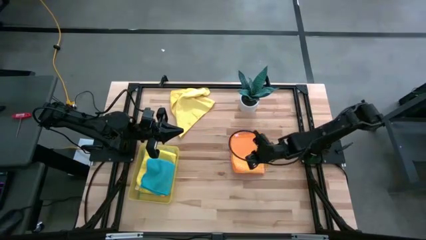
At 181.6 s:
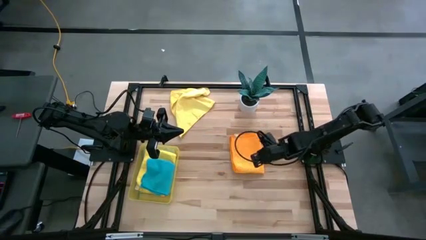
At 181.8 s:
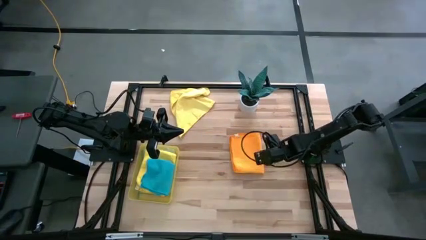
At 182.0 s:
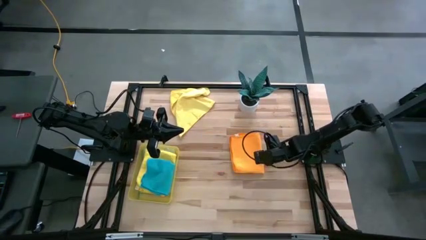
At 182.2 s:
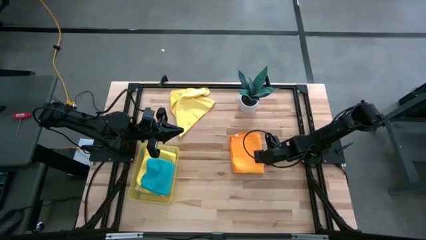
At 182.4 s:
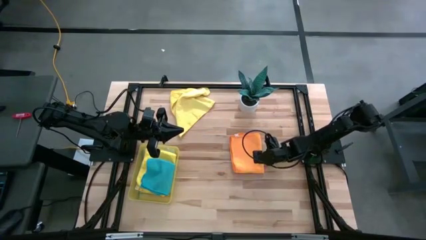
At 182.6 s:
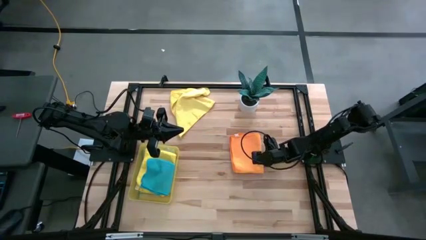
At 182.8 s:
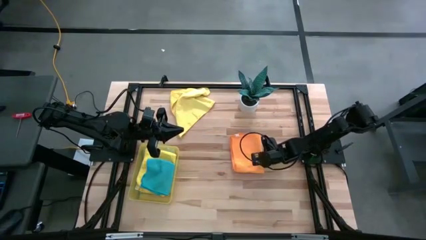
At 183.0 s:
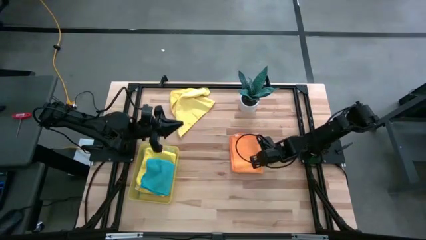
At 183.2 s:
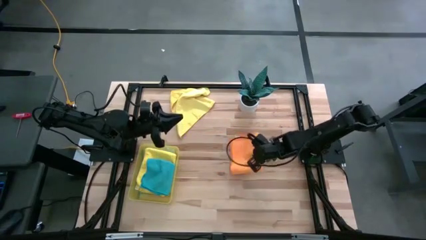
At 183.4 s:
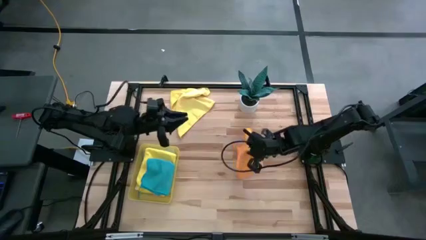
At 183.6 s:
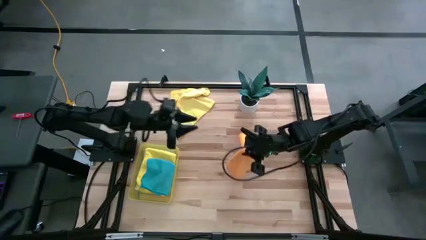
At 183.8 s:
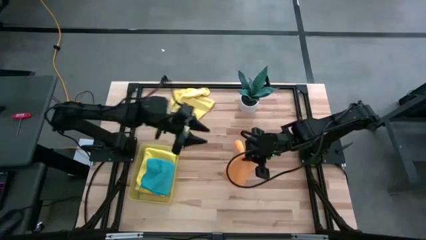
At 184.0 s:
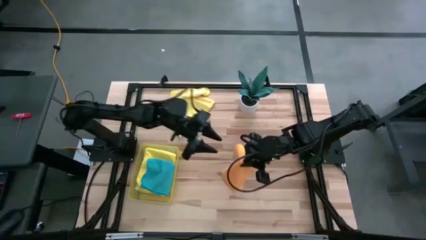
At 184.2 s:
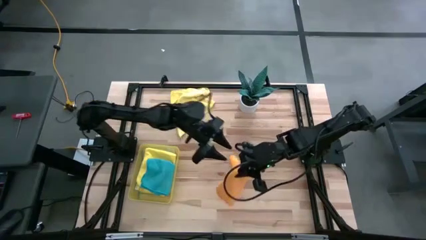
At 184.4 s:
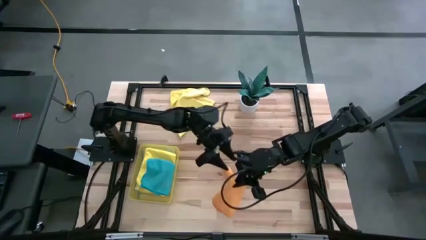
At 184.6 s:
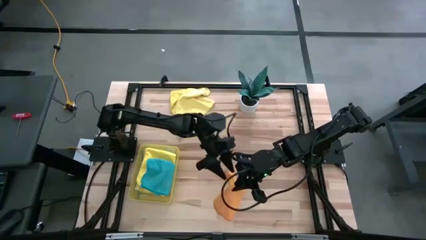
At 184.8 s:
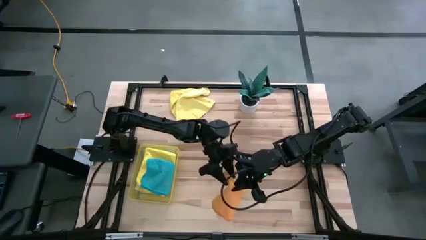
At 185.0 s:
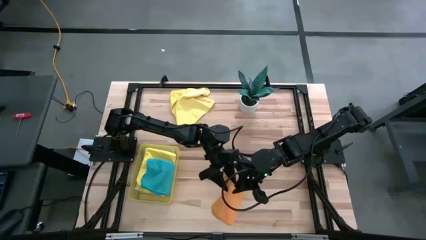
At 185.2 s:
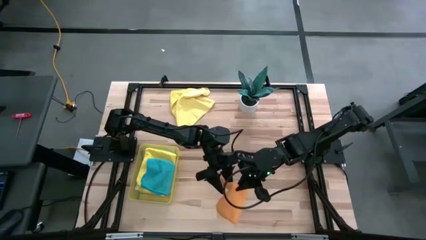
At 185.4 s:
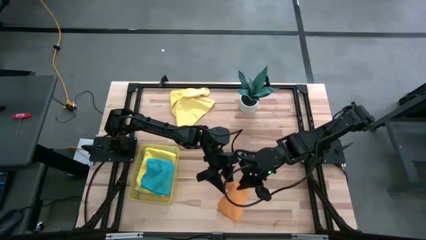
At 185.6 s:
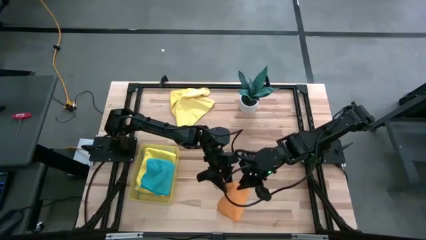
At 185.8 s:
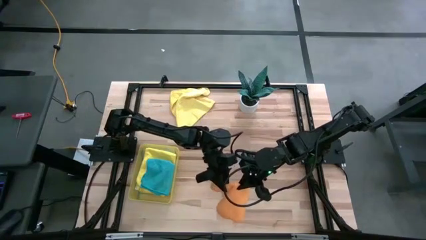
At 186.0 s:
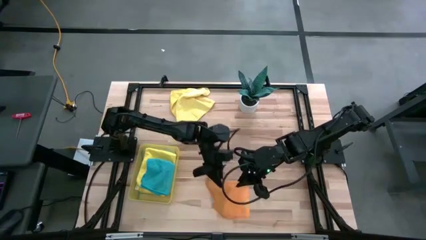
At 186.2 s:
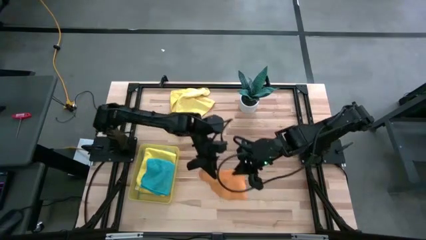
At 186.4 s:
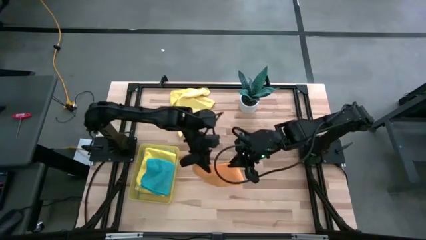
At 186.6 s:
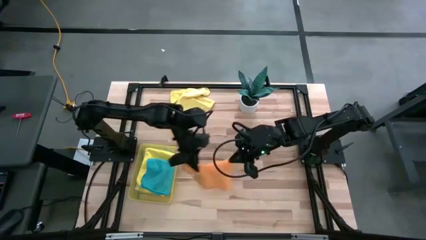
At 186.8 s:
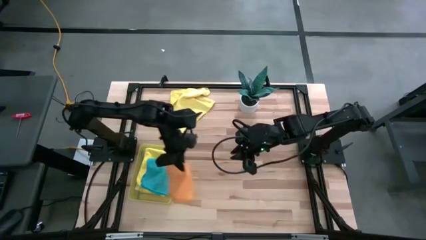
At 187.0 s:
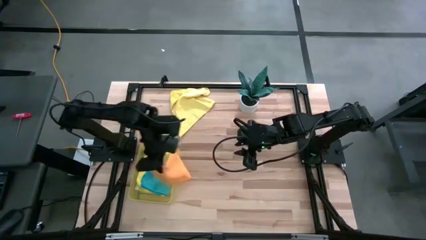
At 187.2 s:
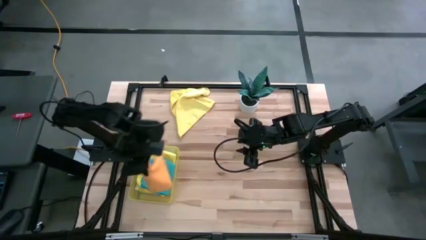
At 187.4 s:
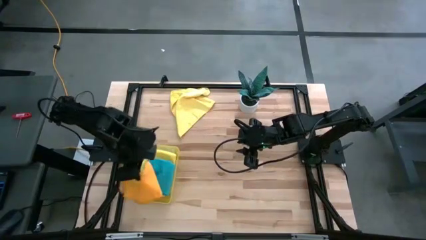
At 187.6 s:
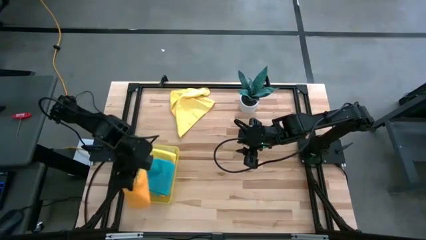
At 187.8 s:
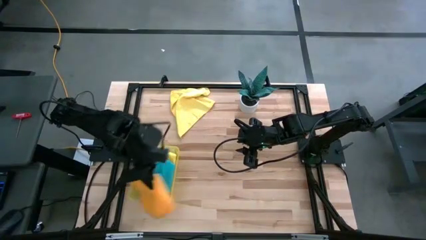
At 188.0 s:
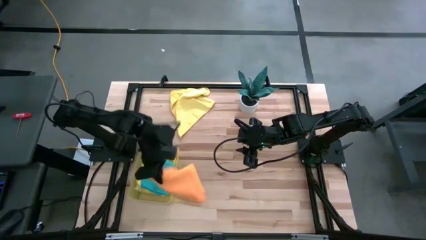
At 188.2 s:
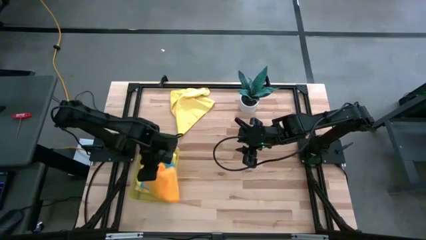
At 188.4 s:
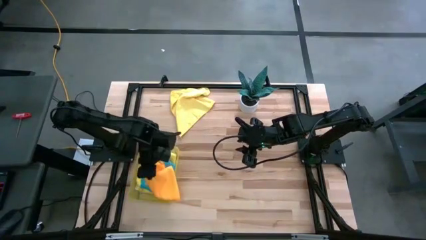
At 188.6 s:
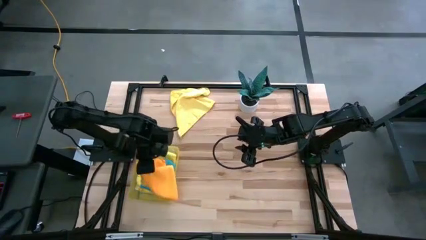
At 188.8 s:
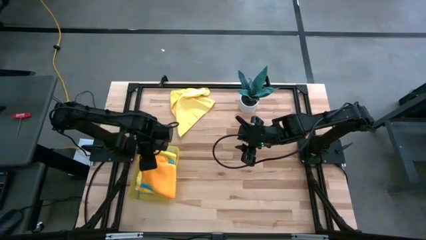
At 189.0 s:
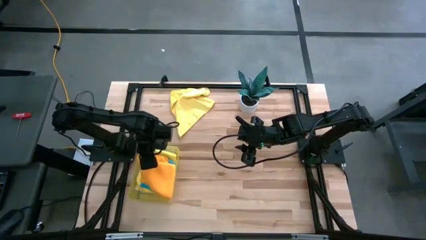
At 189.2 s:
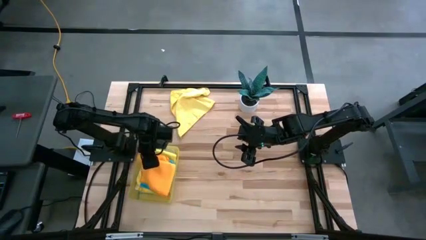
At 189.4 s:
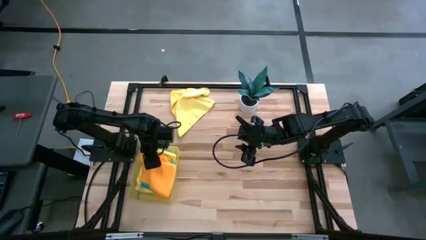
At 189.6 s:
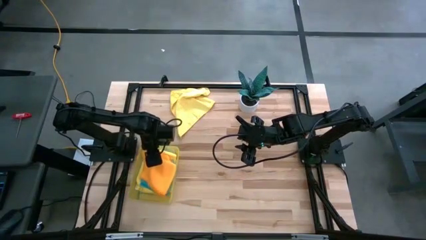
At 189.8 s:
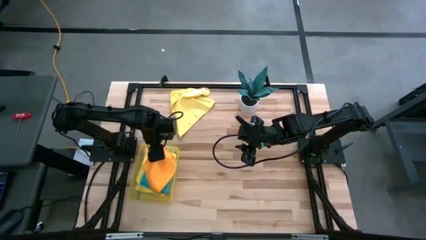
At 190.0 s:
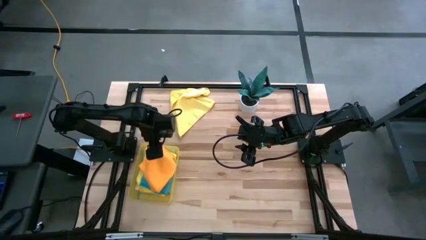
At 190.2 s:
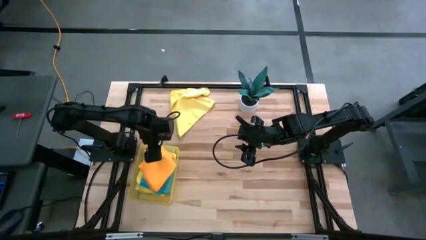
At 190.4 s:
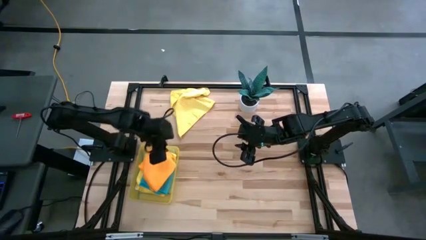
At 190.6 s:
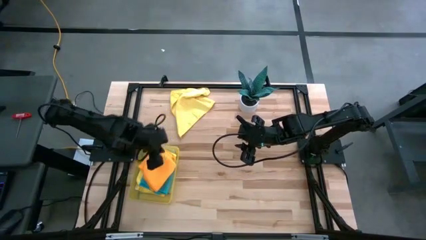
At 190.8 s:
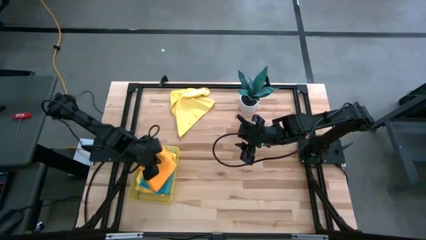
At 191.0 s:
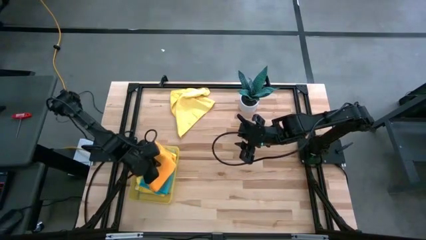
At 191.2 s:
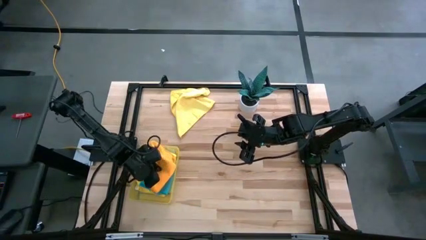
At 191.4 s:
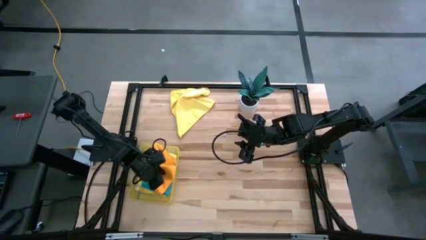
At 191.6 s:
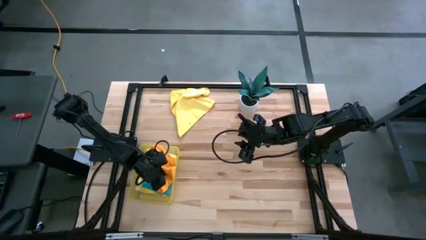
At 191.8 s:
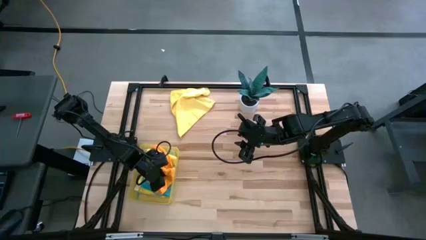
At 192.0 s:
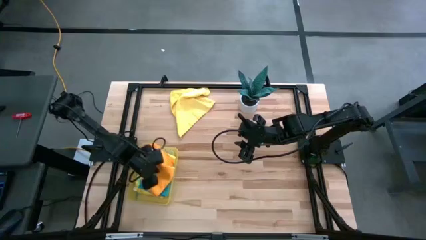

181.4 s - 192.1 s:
Task: Fold microfiber towels
Stack the orange microfiber cloth on top of the blue microfiber cloth
